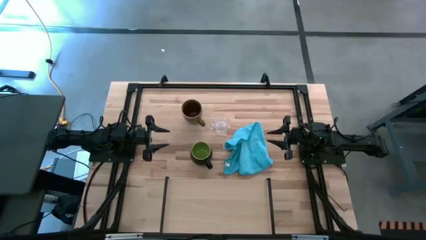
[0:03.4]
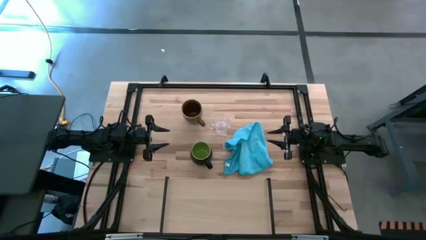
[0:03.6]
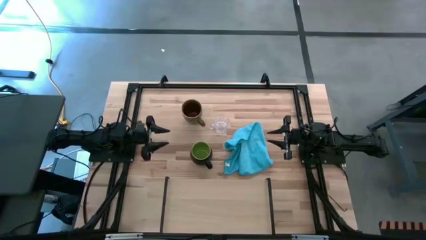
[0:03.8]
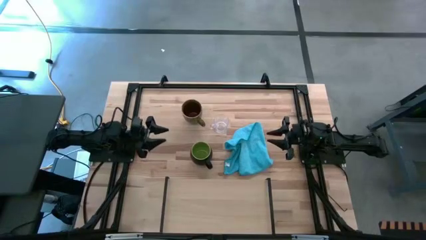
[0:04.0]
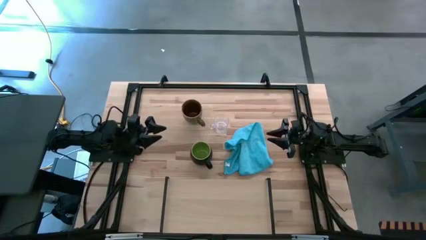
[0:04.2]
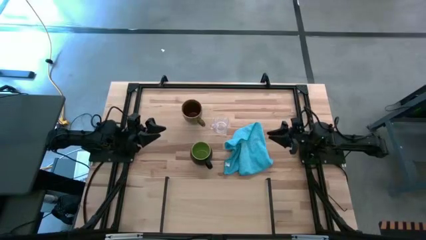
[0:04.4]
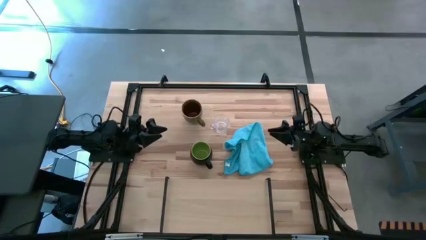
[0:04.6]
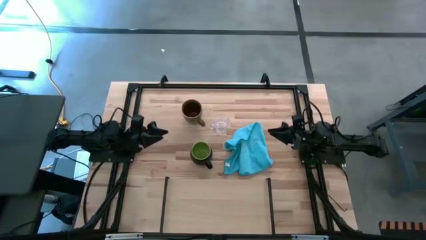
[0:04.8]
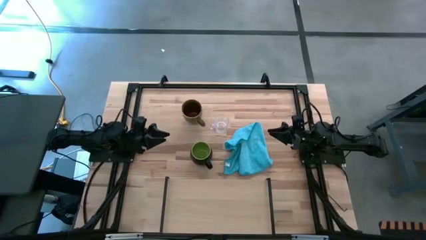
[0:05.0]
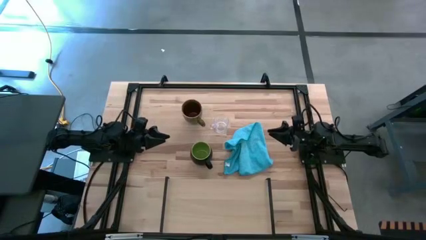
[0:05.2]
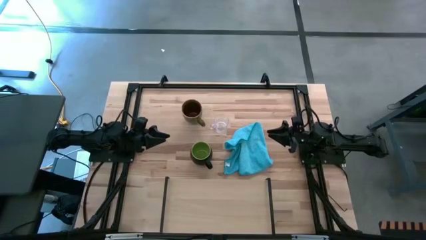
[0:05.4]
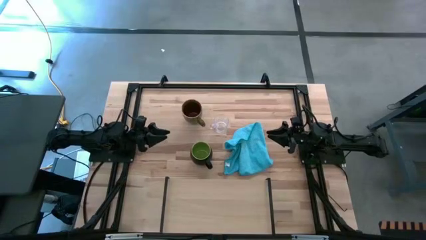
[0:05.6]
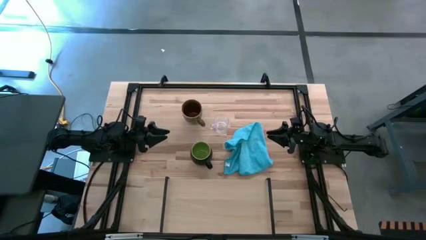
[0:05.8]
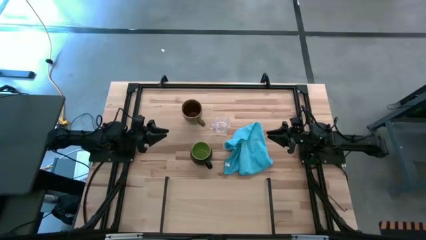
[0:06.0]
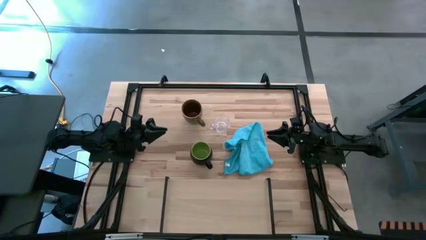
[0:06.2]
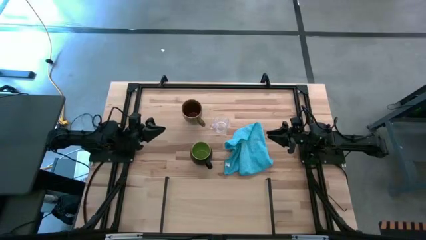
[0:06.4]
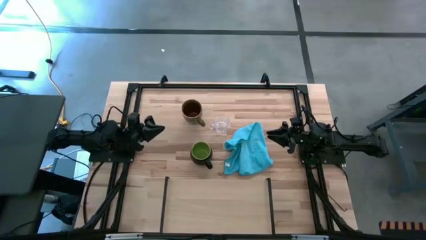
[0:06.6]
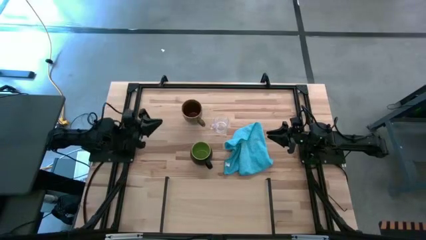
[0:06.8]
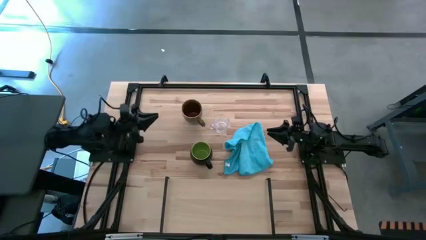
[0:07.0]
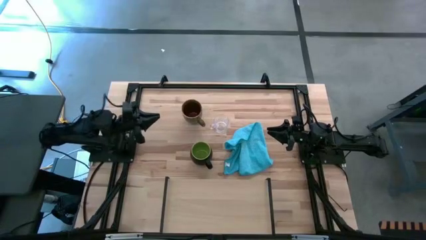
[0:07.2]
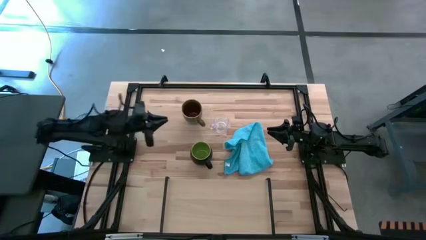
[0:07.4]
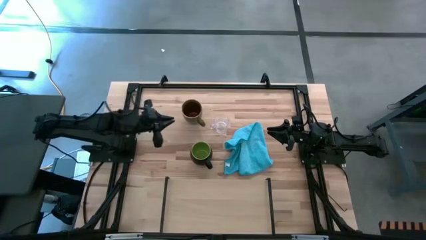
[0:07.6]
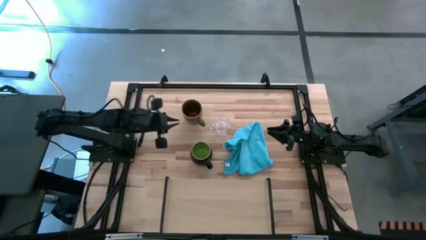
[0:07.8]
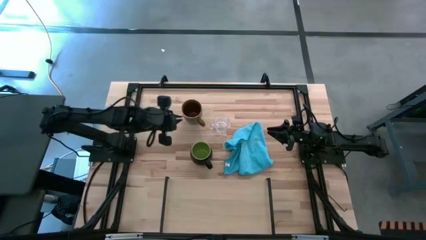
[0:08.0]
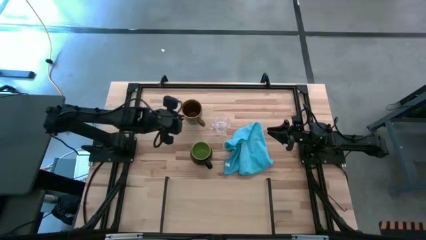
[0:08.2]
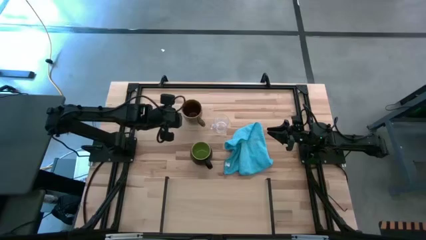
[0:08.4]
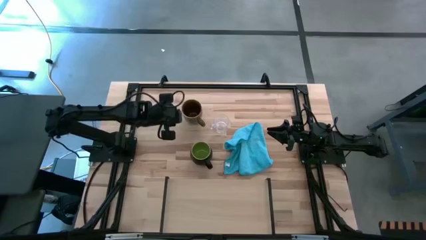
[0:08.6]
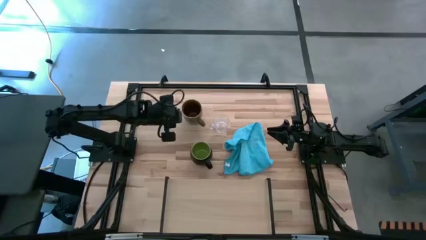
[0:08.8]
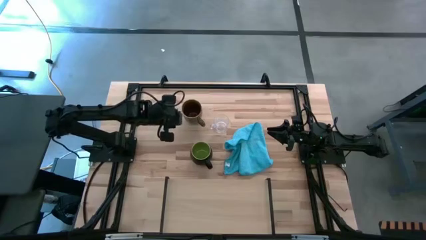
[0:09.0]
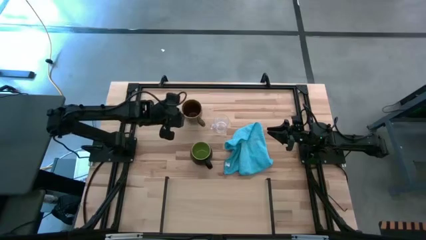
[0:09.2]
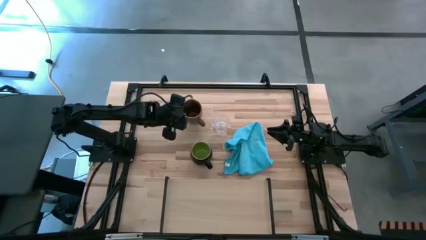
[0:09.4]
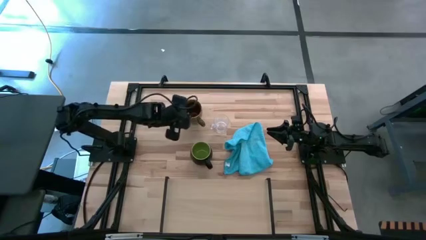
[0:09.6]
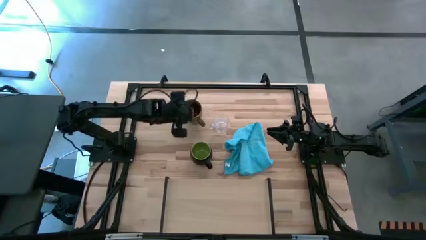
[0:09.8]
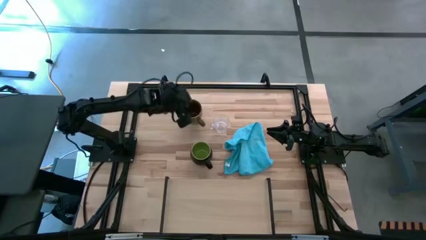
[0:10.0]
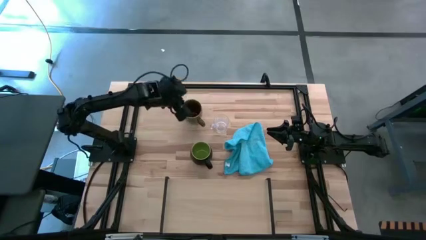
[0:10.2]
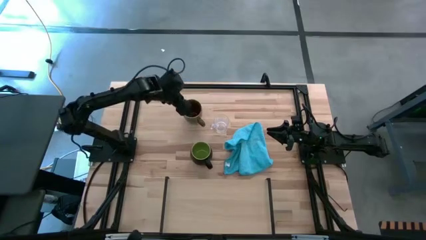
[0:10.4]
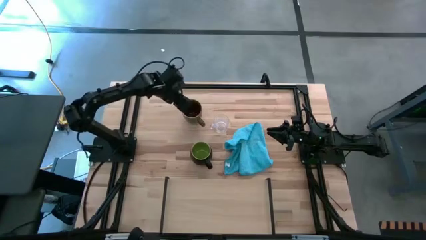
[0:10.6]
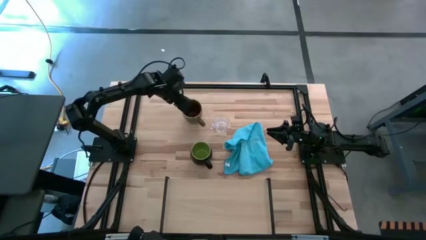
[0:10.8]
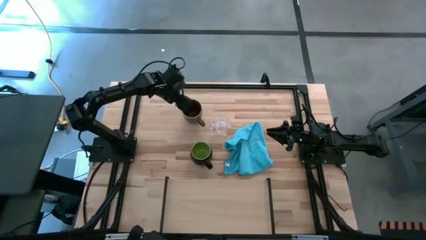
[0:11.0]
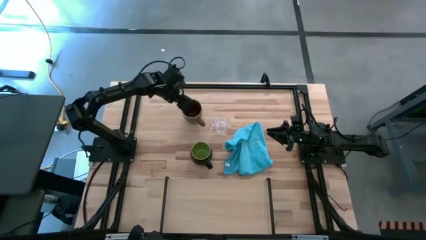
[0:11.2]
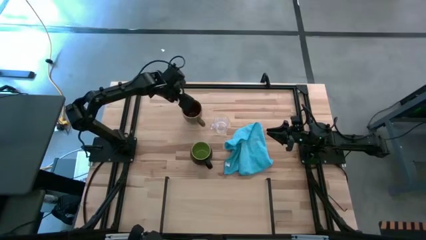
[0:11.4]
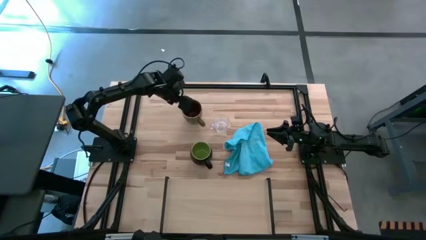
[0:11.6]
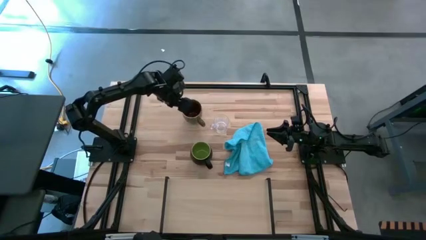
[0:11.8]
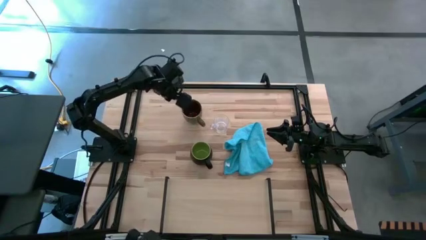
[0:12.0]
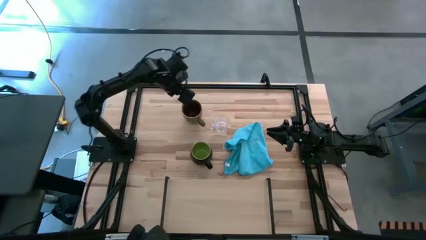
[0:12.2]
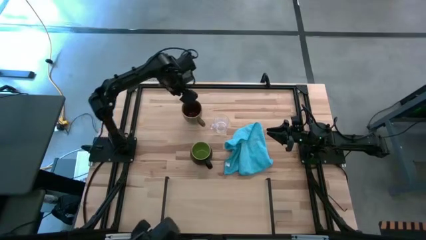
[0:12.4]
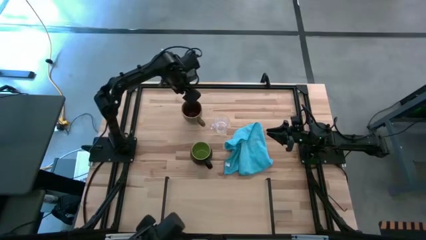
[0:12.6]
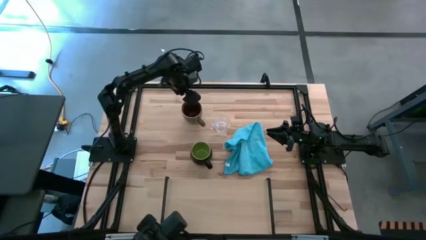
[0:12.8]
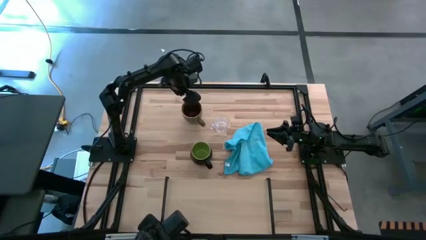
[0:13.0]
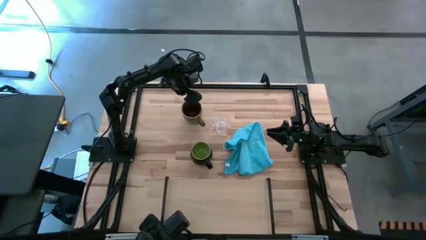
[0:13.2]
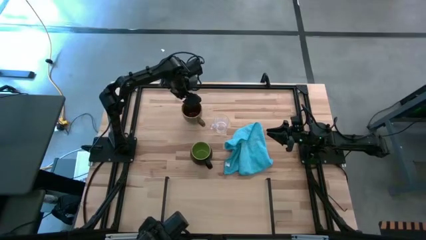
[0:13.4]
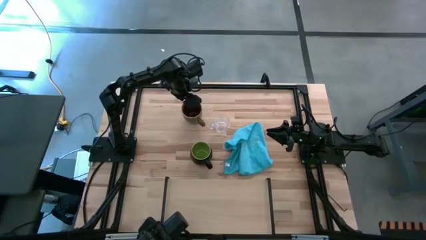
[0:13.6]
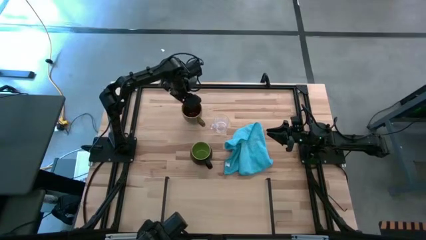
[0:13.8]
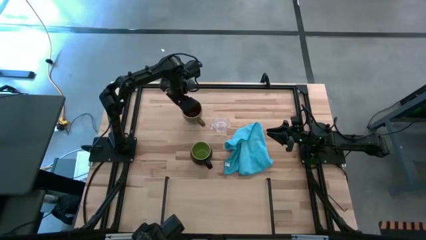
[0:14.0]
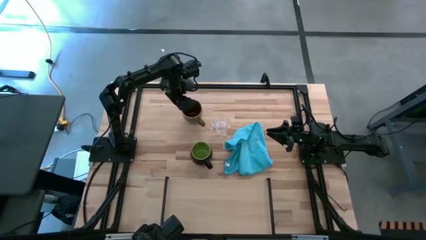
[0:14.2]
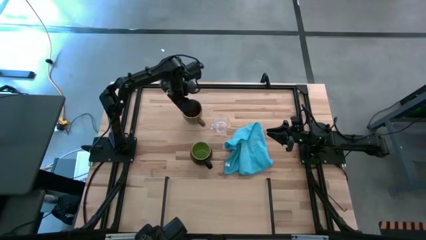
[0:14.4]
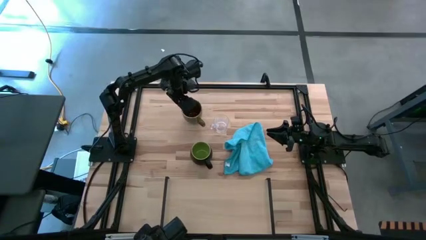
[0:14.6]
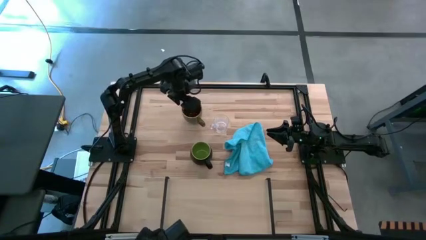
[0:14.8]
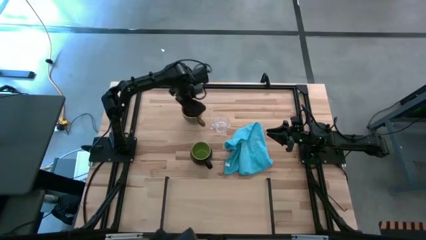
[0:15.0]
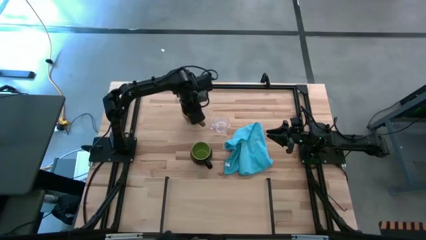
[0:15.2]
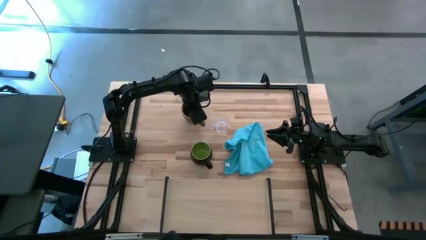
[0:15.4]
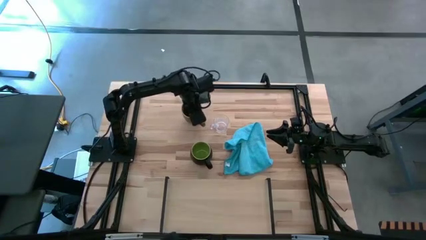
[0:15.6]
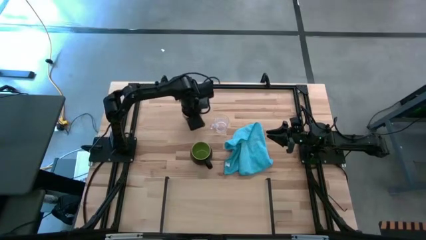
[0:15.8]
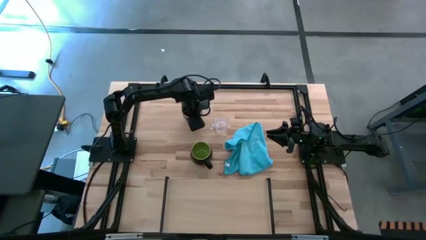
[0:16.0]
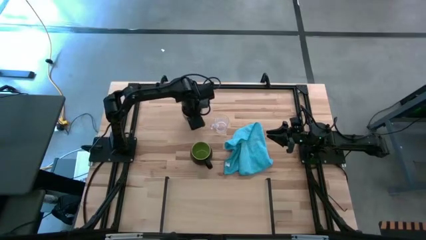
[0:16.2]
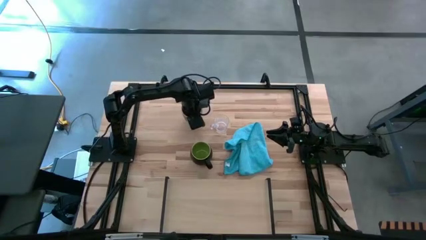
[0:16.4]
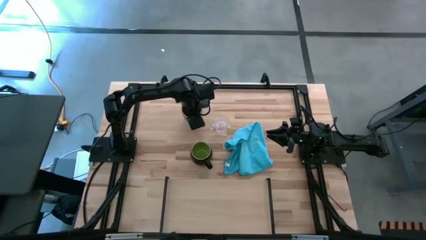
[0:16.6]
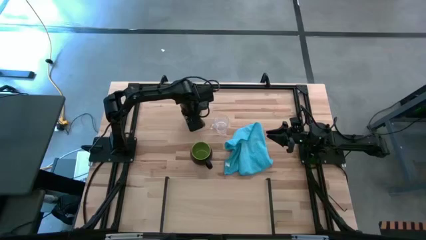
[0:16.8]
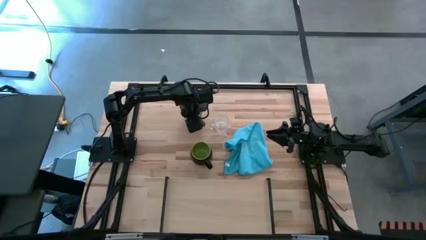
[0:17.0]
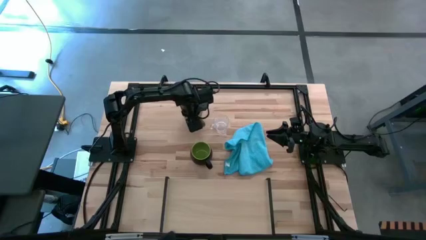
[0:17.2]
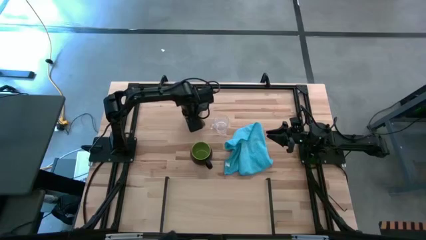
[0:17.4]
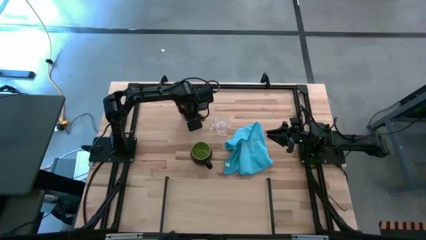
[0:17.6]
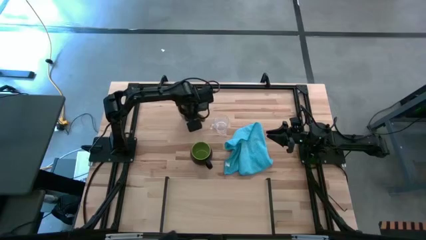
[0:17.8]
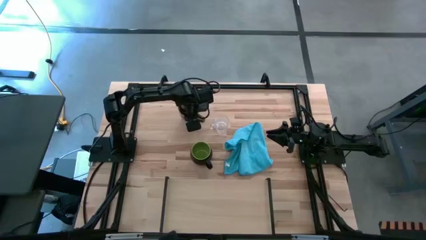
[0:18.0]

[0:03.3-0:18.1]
Task: Stack small to large cups/mugs on shelf
Put the brown green mug on the shelf
